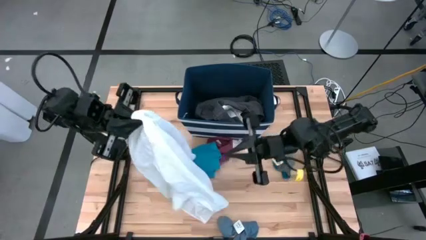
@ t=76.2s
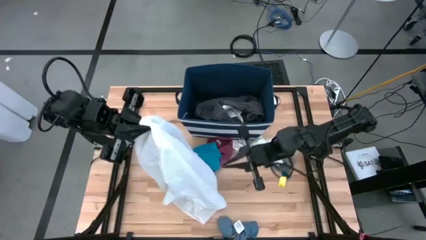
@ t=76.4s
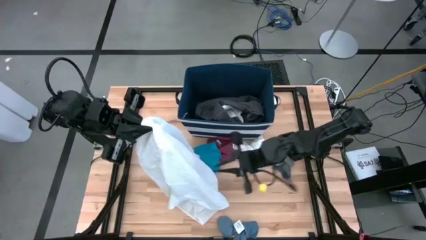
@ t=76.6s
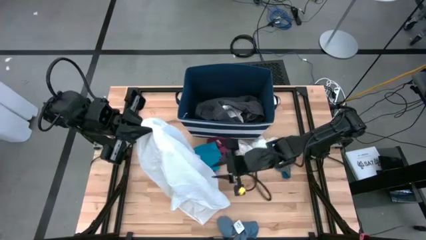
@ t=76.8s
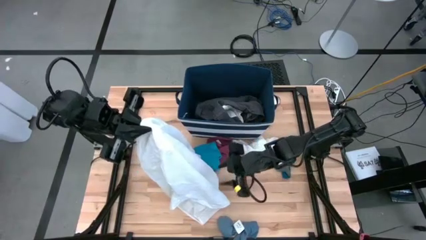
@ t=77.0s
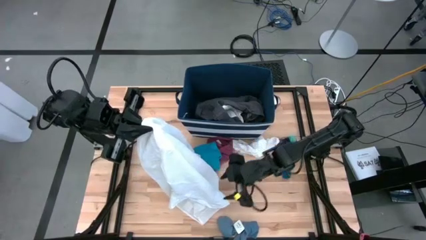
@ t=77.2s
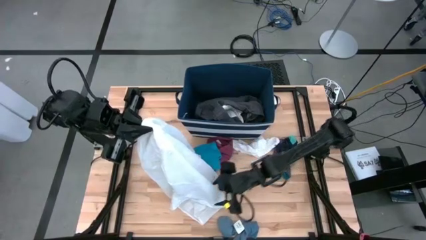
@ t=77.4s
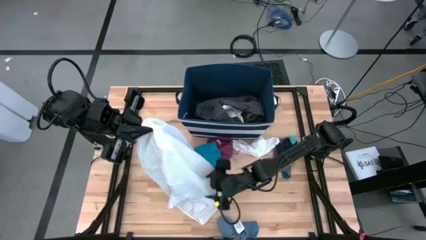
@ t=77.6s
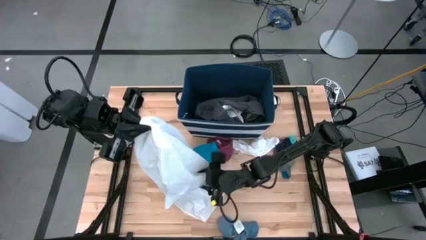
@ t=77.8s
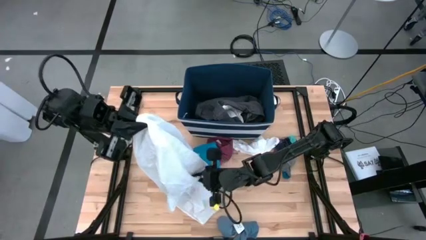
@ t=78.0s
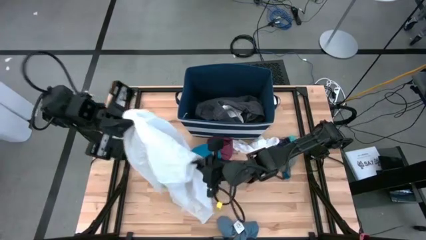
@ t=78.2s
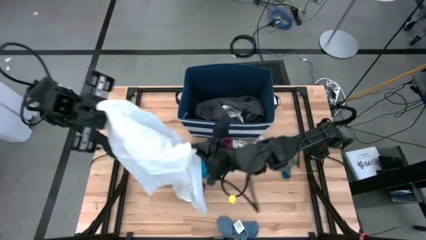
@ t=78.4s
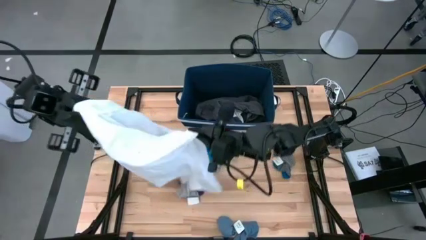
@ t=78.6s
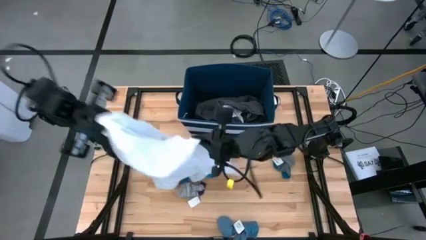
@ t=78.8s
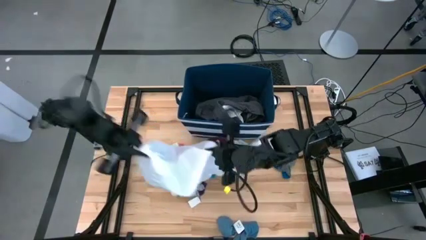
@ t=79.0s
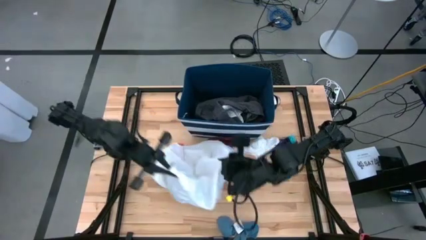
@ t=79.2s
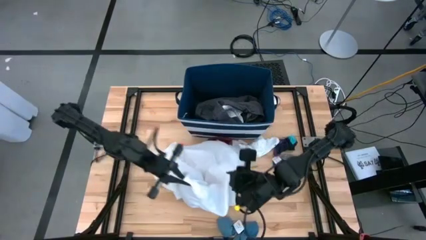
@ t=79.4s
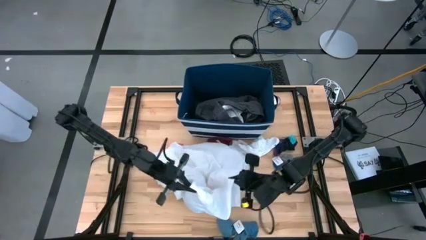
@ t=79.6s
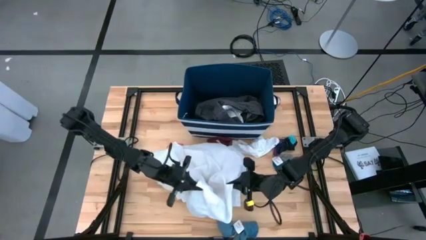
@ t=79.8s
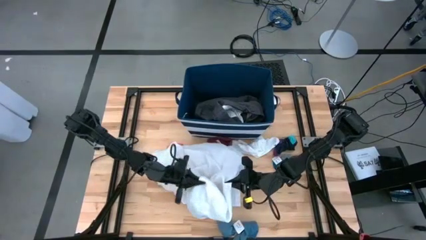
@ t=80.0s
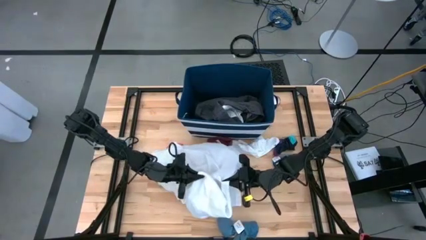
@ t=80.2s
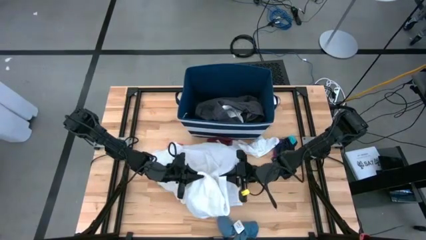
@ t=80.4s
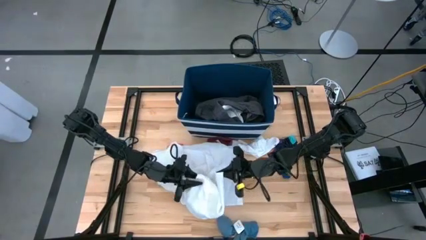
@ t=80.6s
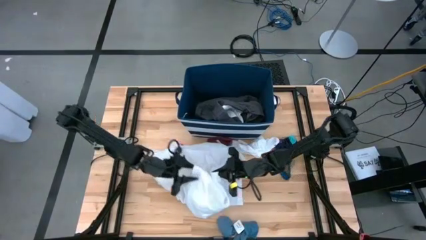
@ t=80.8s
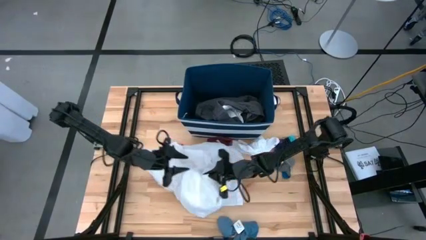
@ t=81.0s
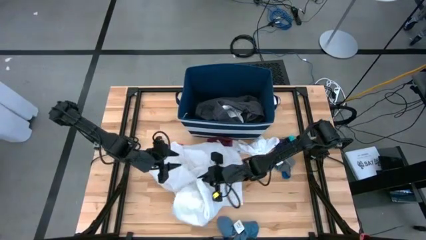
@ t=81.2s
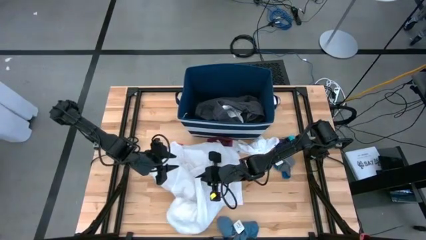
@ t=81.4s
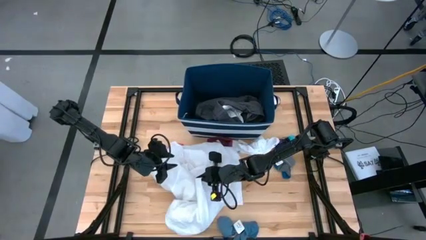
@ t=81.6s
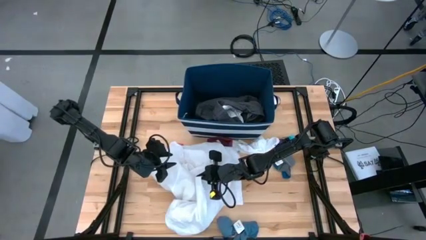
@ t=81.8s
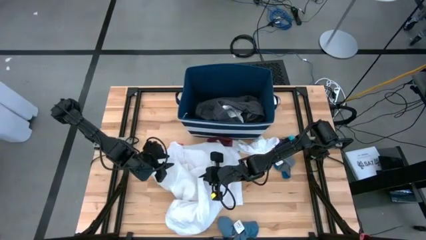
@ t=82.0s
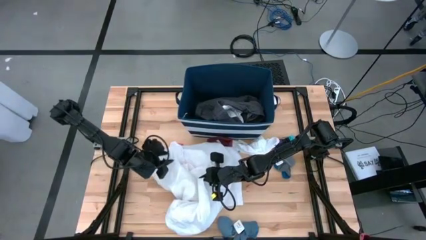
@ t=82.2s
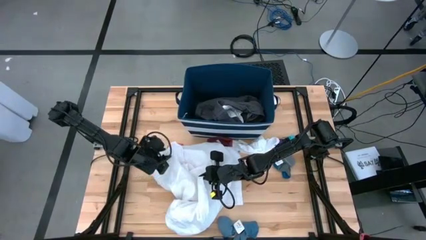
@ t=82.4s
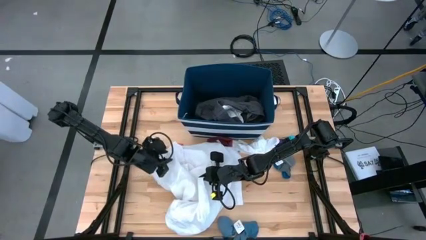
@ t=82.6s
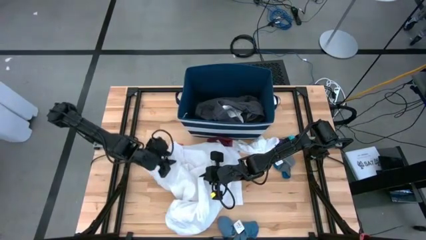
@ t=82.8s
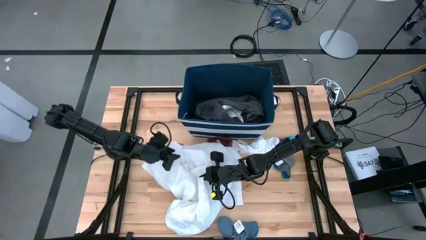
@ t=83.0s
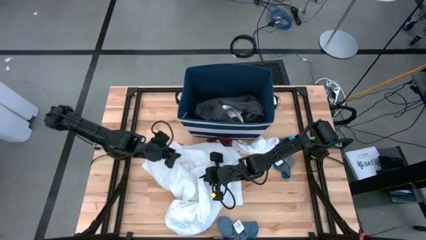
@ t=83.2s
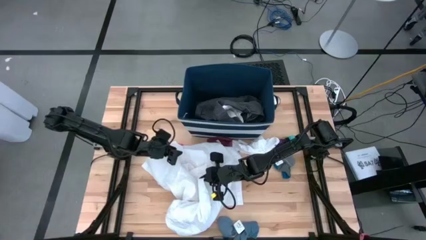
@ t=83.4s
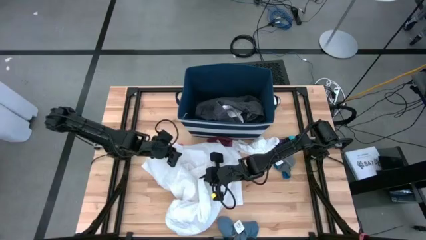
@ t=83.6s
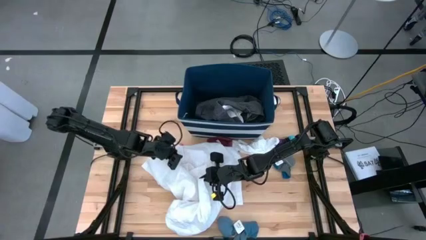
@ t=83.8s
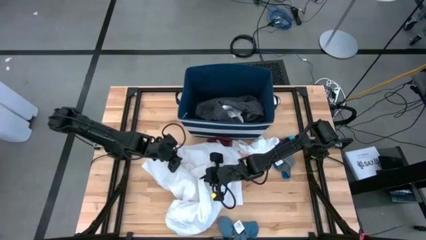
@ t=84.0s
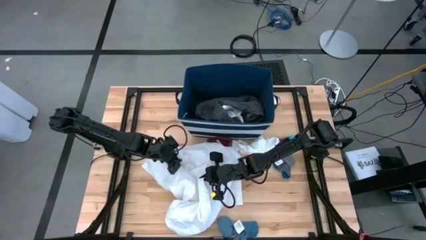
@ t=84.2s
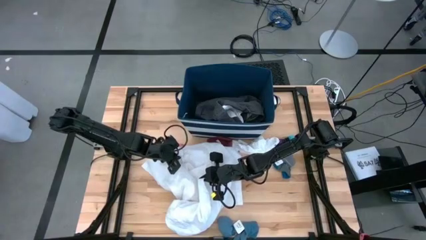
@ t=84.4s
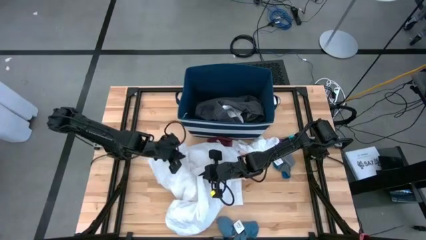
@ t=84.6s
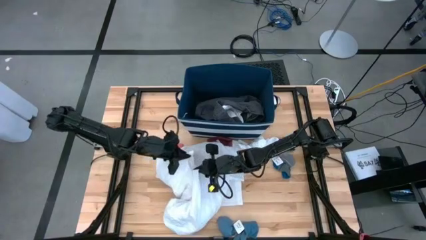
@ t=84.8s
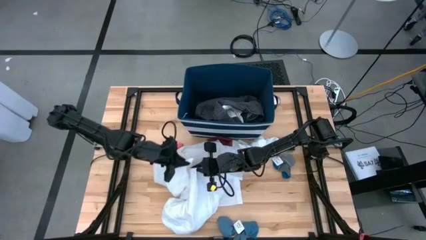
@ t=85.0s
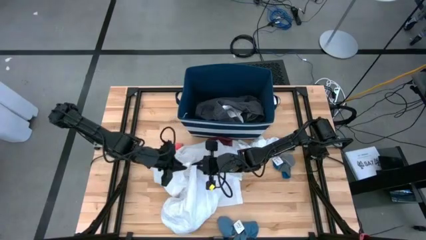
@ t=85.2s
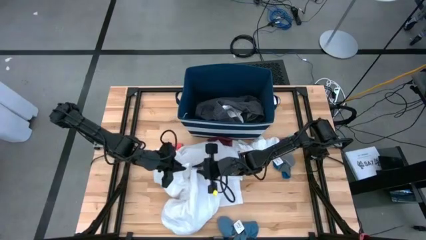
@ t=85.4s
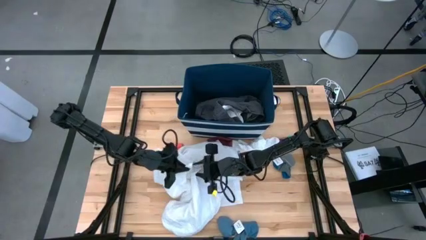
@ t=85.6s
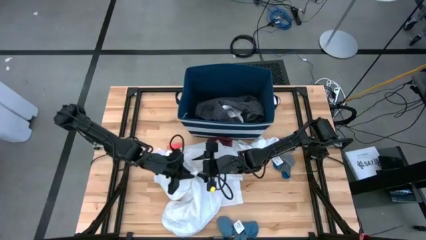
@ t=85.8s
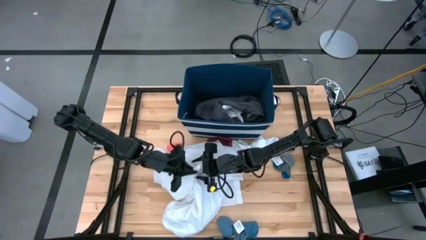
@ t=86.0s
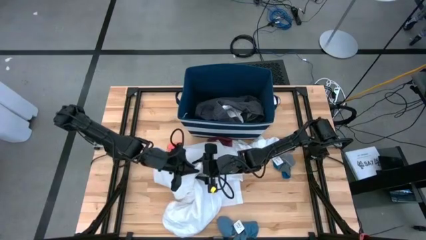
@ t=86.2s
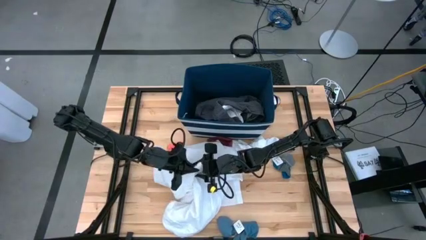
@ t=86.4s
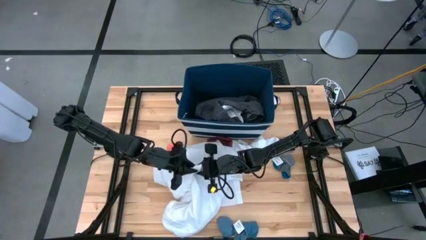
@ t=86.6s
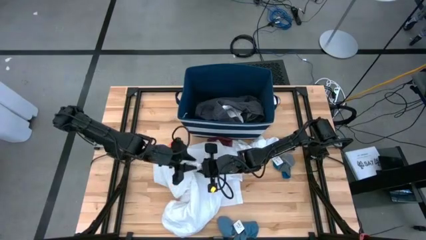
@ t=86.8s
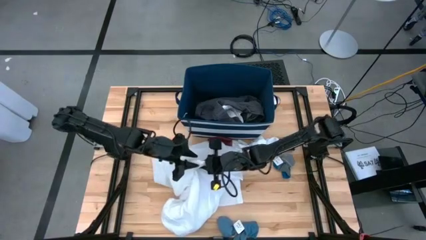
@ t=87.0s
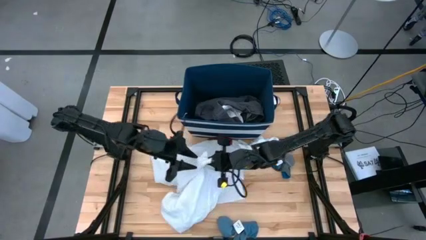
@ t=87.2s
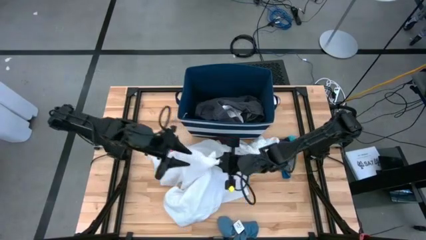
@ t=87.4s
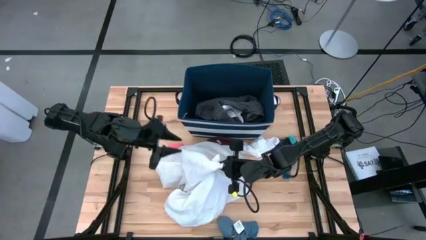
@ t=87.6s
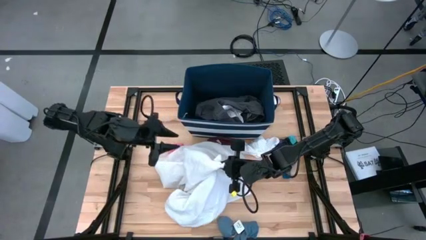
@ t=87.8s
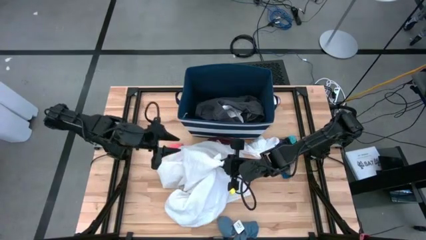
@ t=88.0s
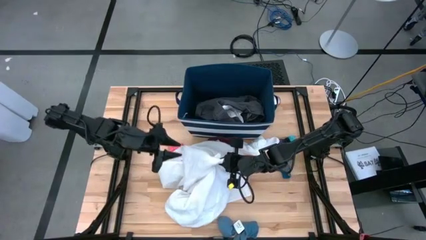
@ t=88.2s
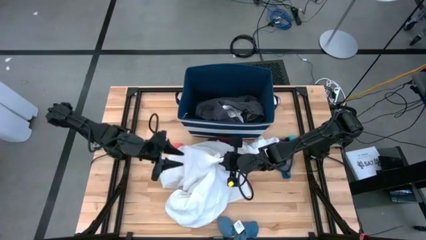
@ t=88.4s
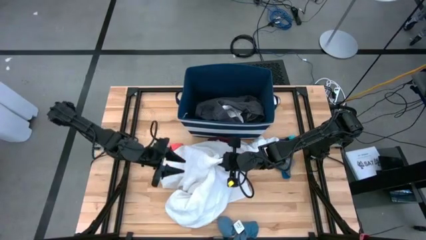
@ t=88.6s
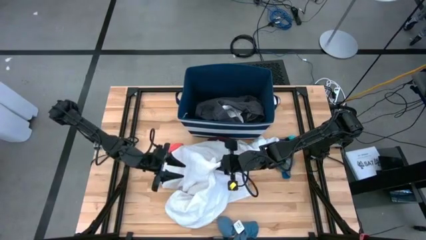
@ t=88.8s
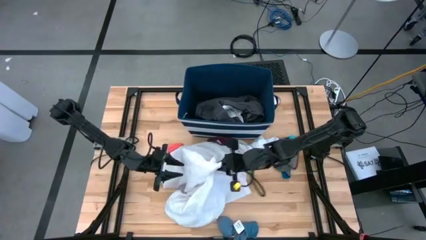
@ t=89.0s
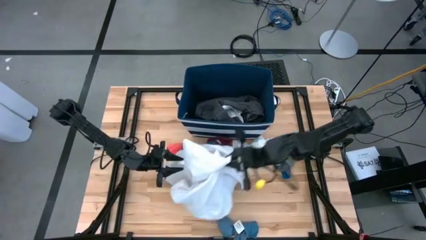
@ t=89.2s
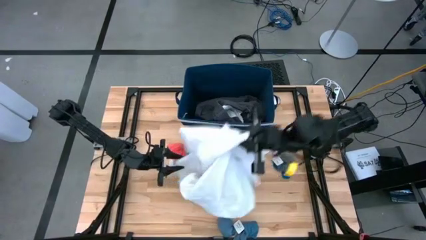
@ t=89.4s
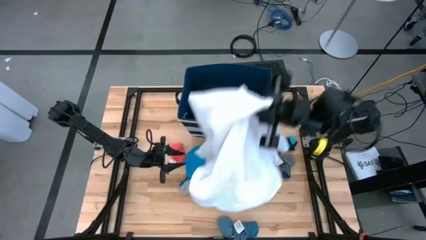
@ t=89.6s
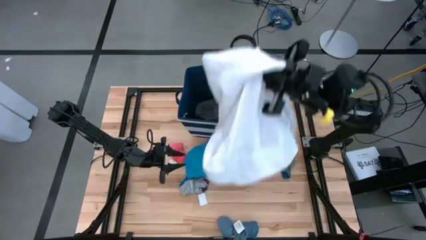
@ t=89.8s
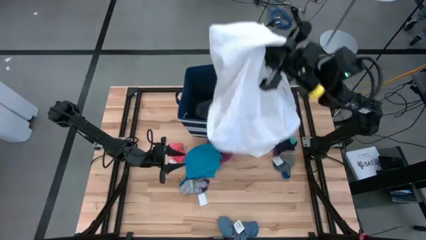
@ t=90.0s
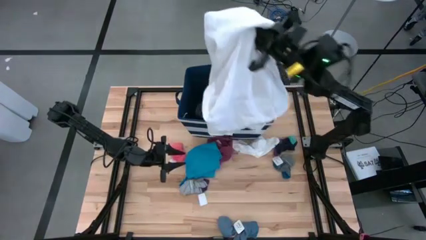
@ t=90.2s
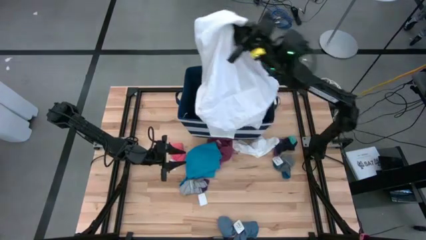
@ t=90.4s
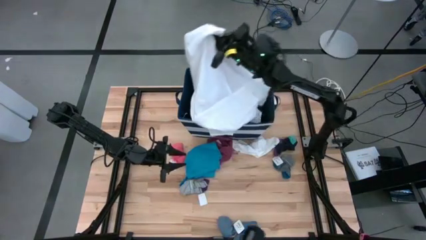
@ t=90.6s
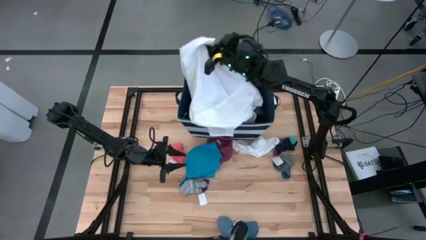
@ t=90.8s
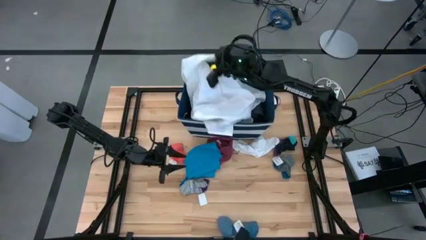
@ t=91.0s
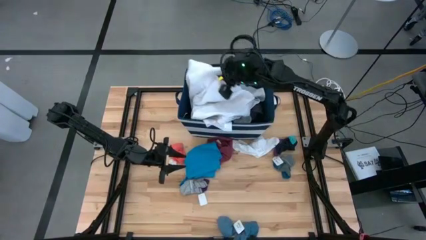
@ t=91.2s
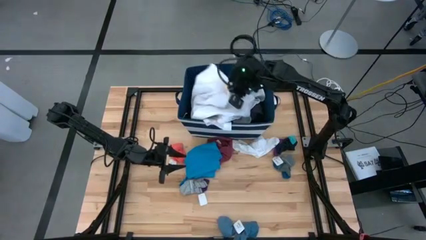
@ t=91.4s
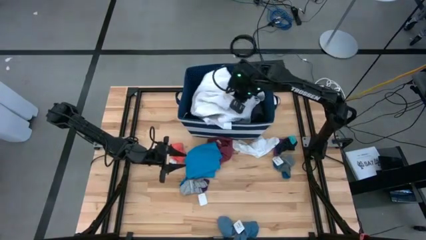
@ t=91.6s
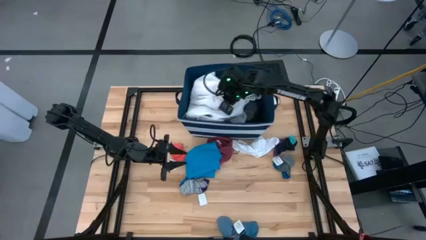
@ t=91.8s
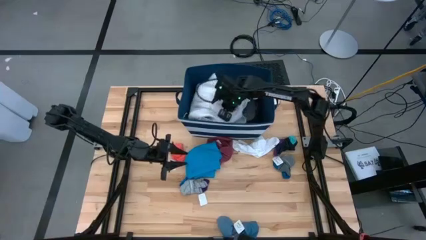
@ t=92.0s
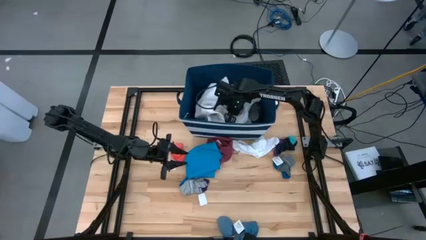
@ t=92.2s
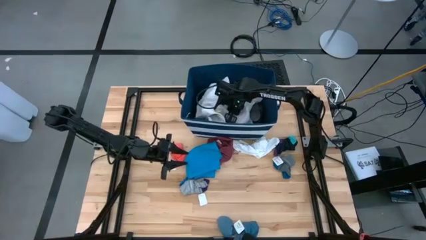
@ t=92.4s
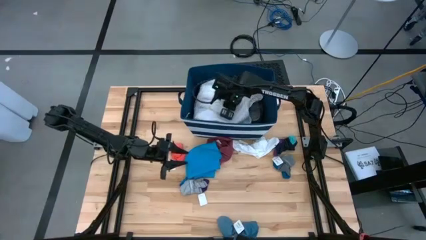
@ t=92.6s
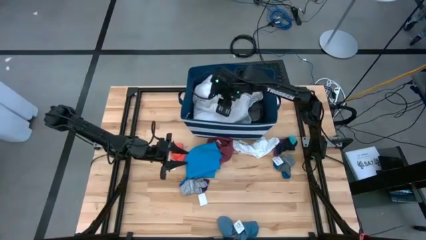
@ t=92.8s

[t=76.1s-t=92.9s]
Task: Sort clothes
Put the white shirt into the blue laundry organizer
